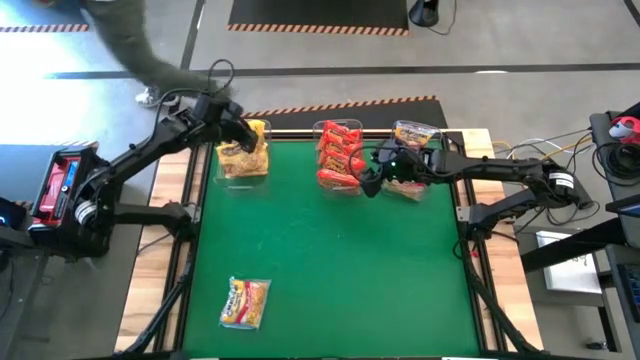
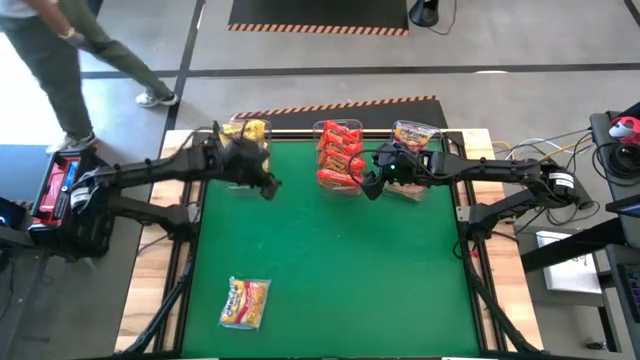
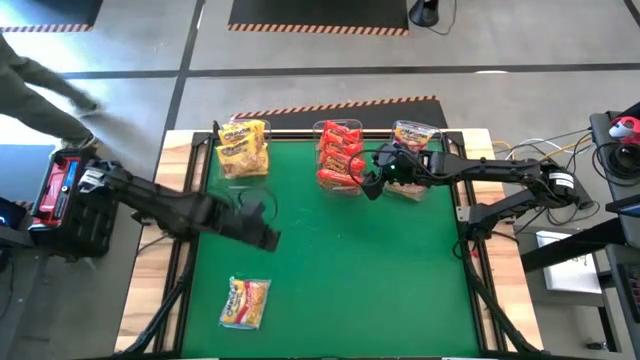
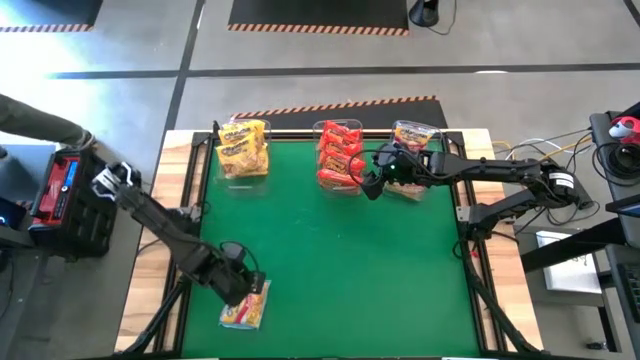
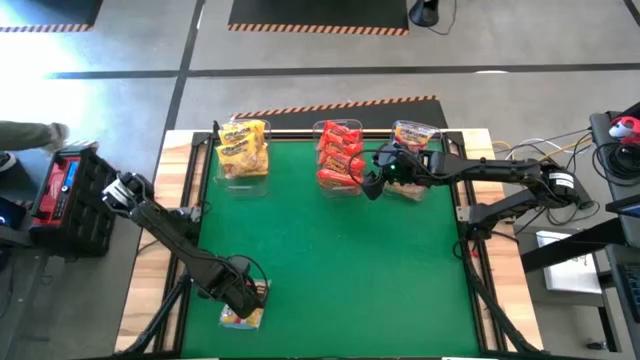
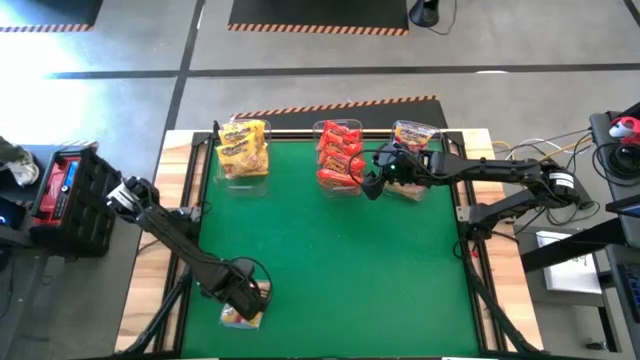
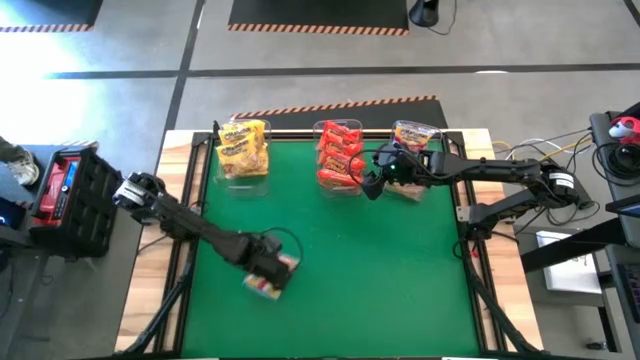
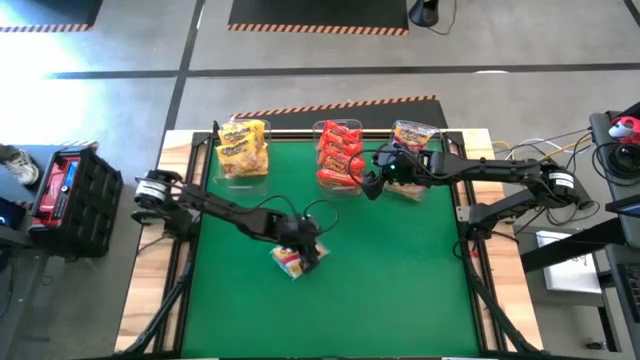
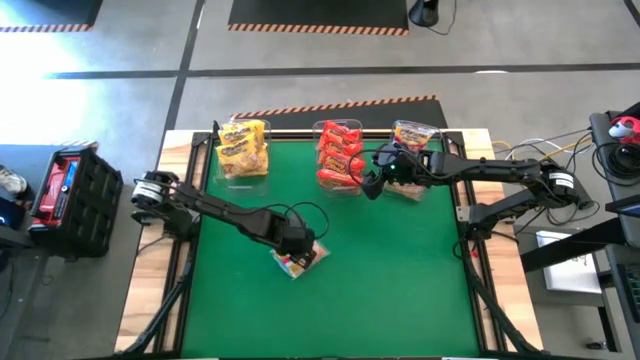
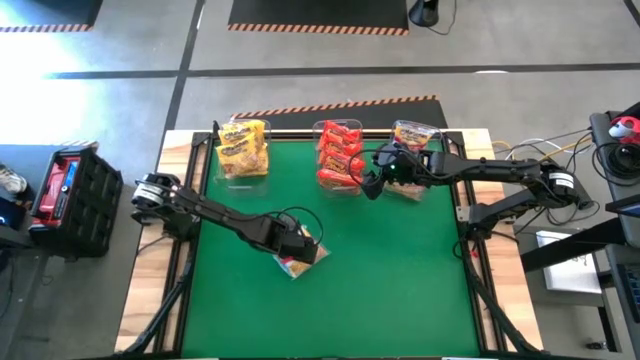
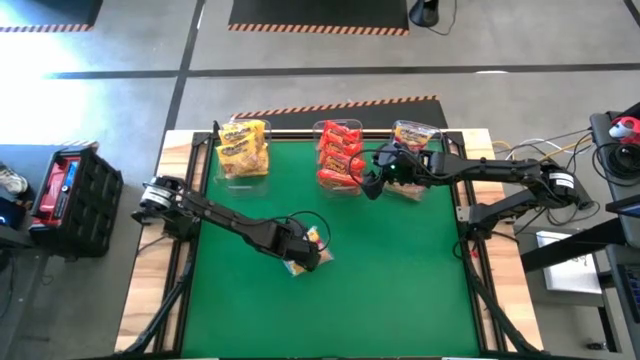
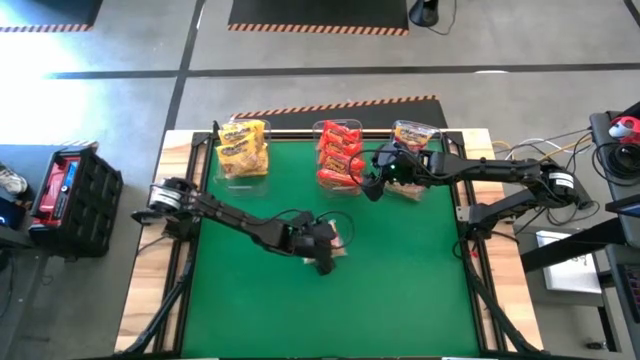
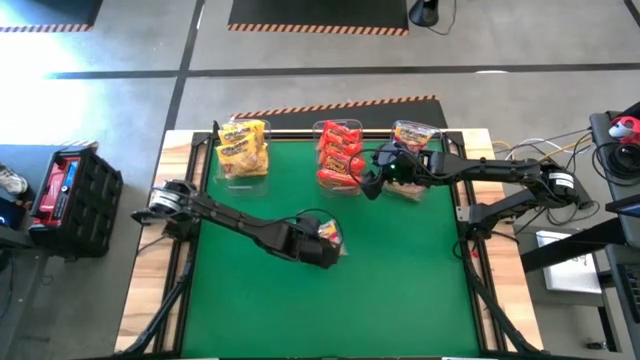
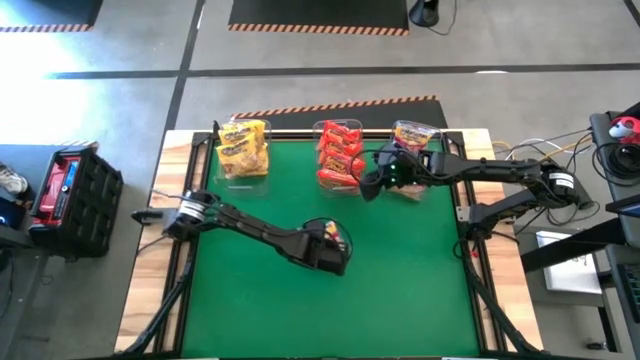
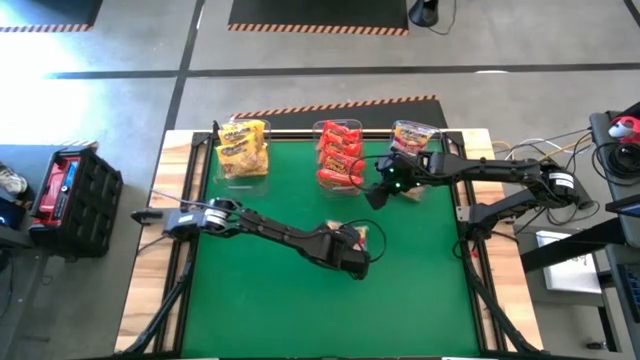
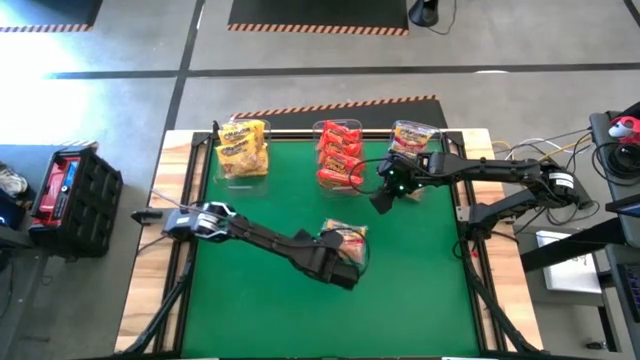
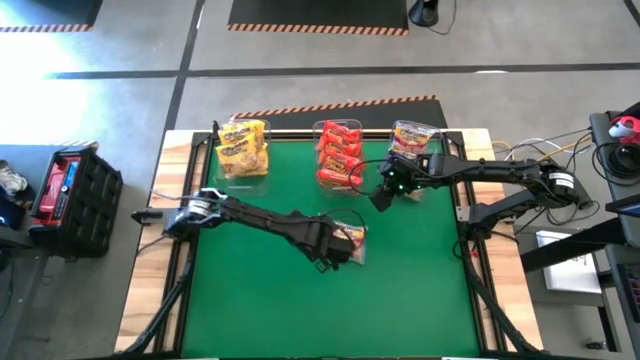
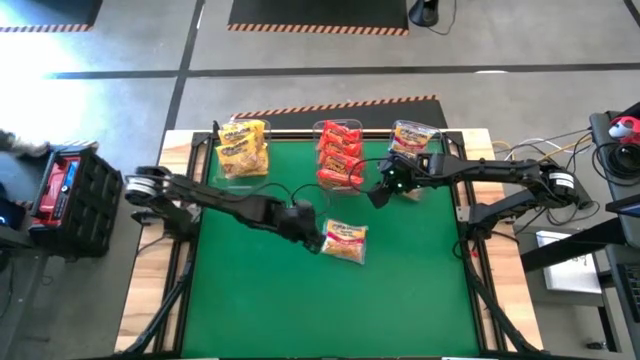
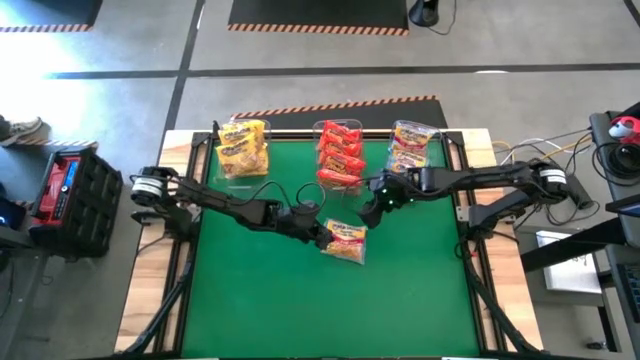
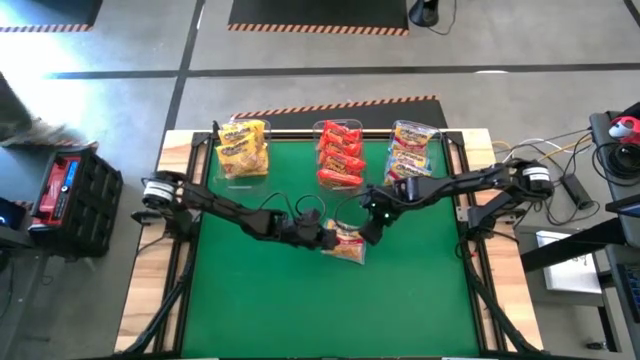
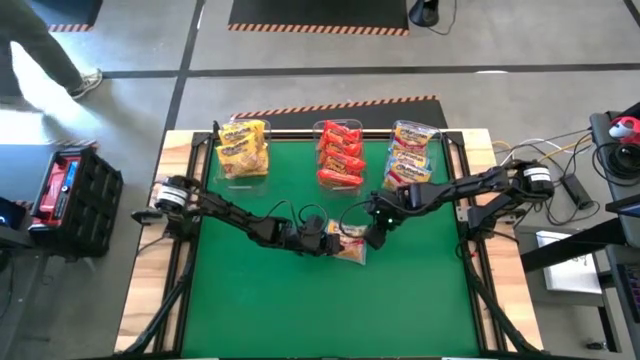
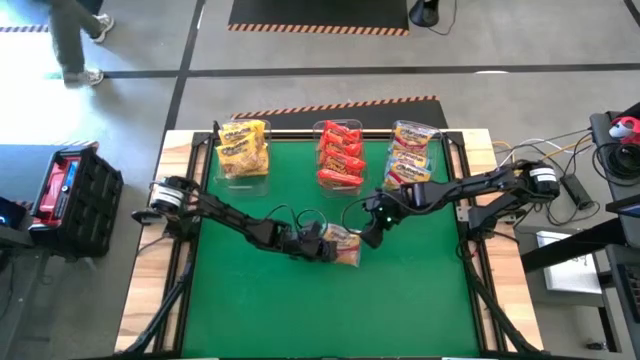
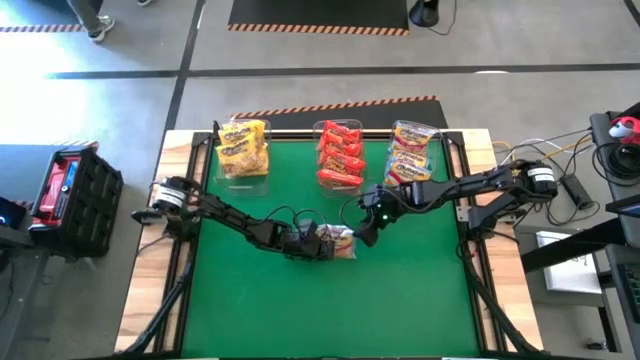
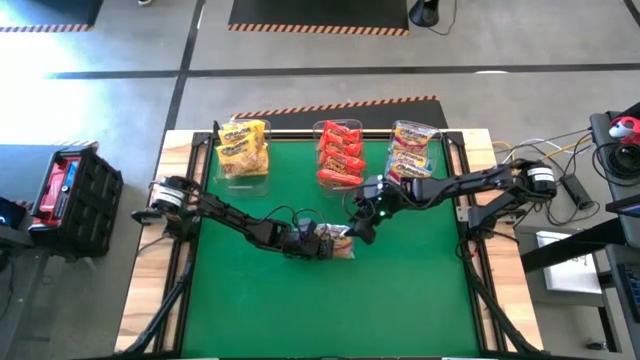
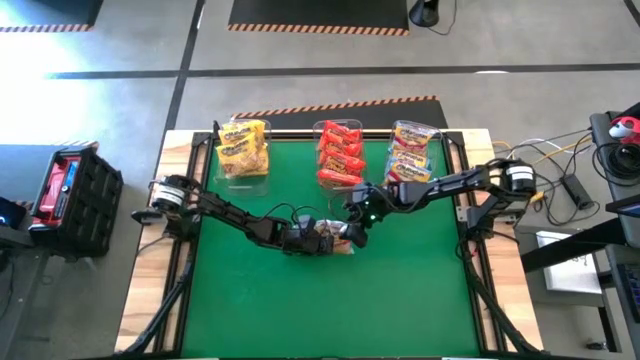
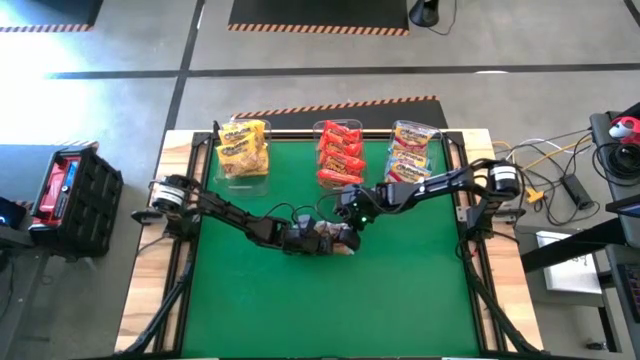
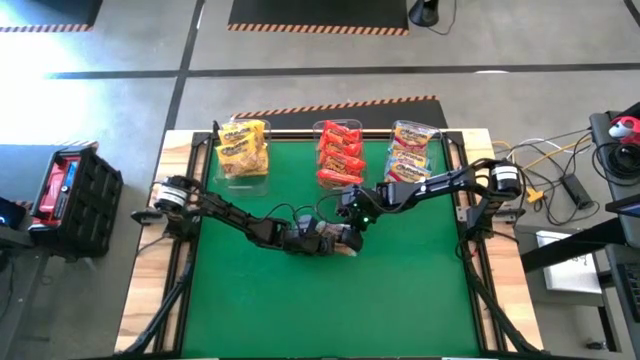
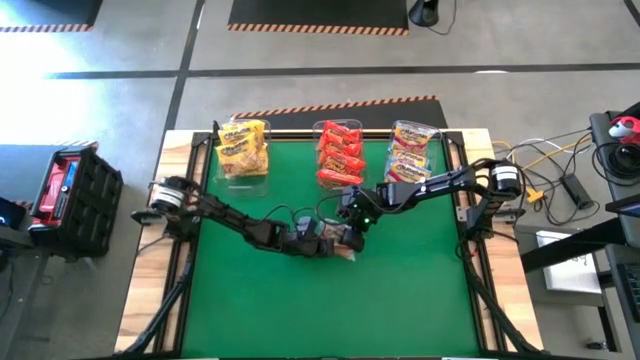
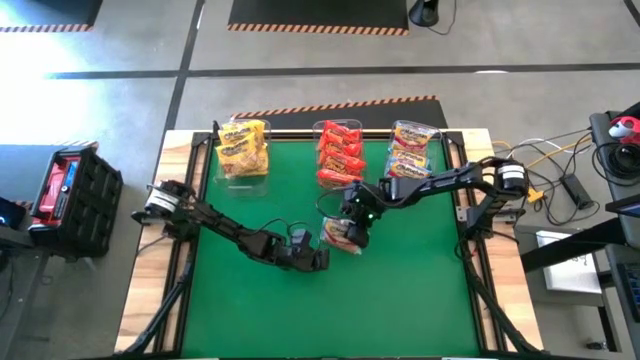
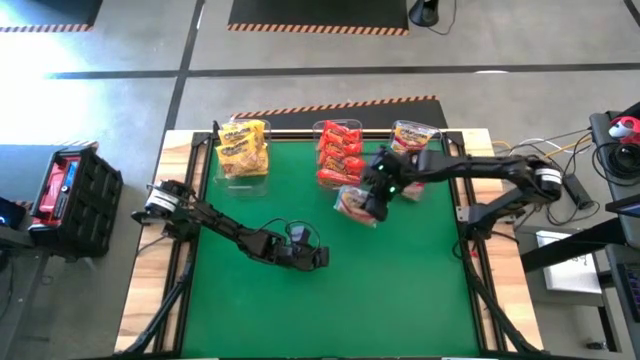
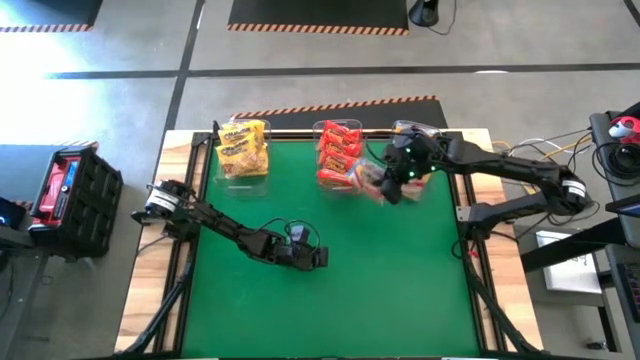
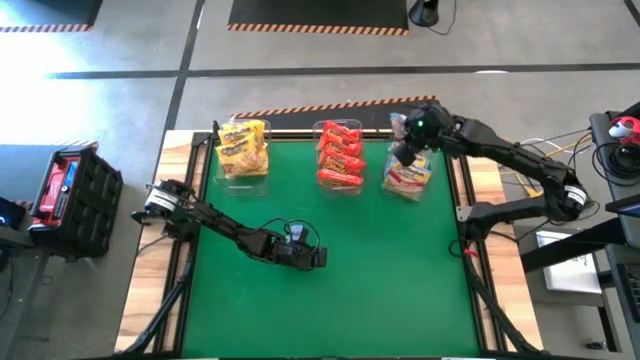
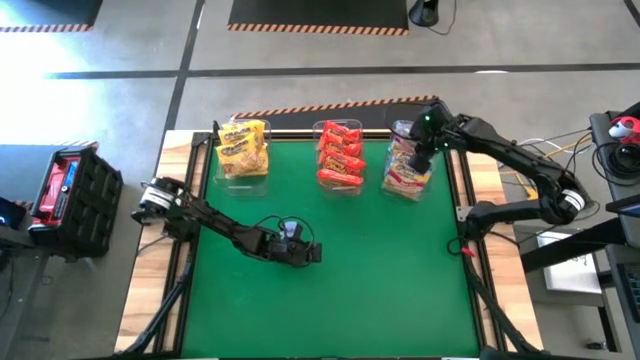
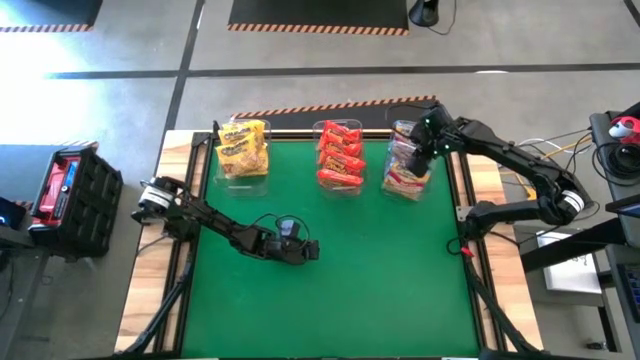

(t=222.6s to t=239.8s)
Task: Sort Maruchan noodles
Put the blue noodle pack into the right transparent bin

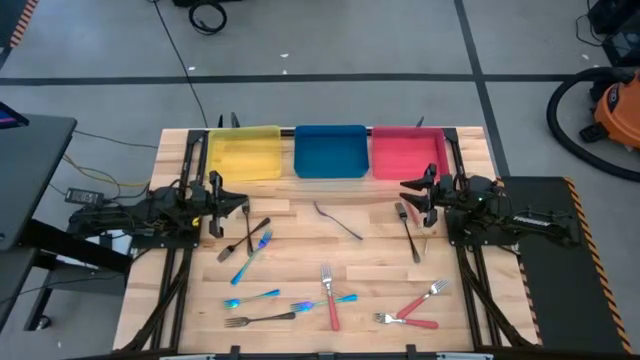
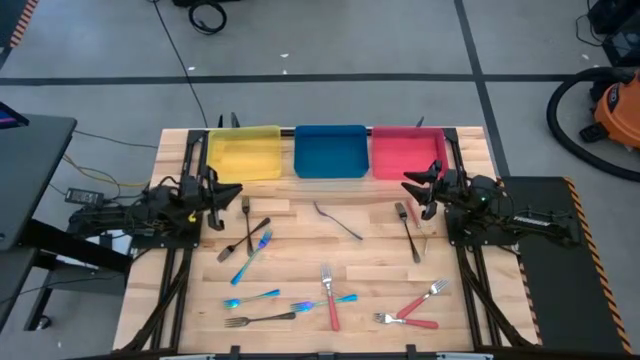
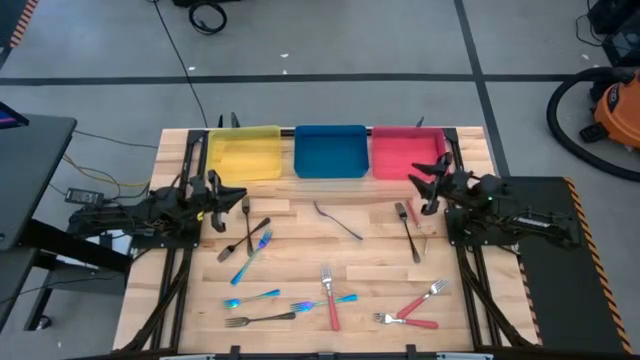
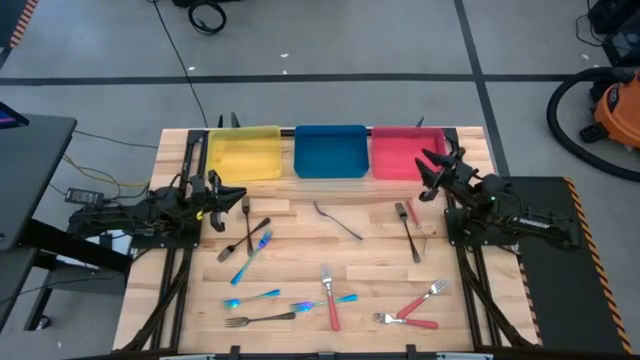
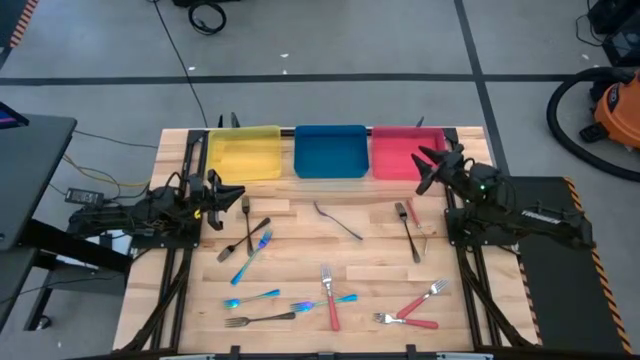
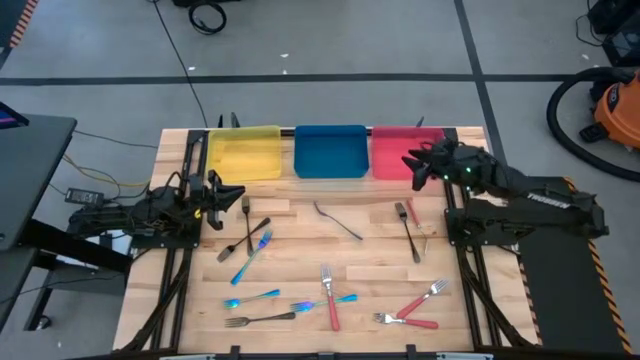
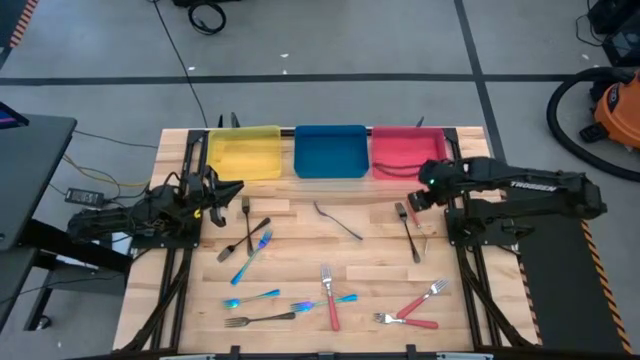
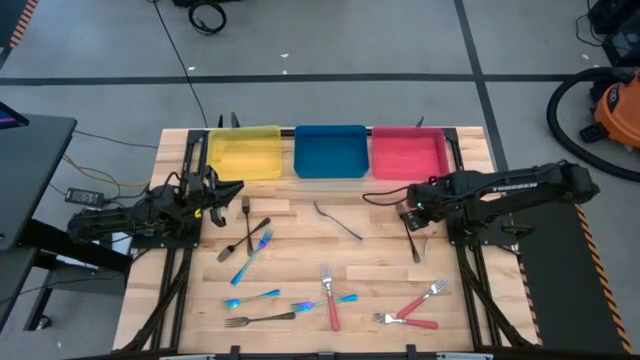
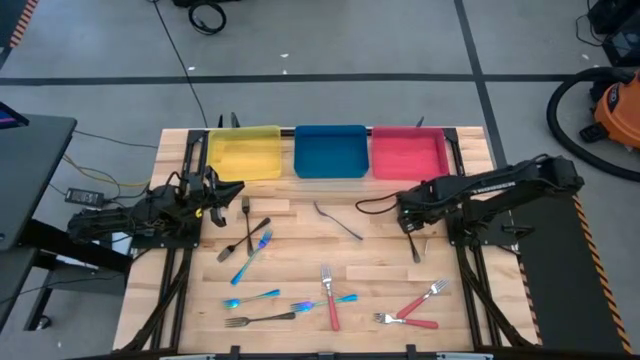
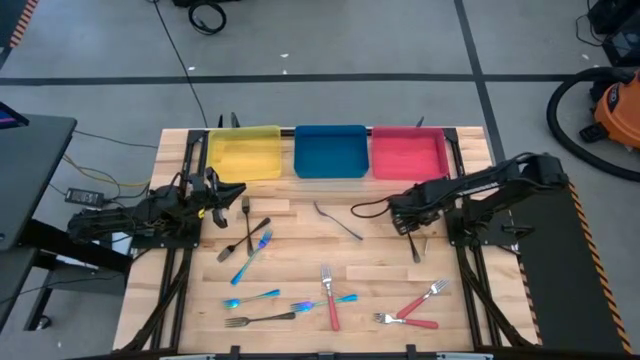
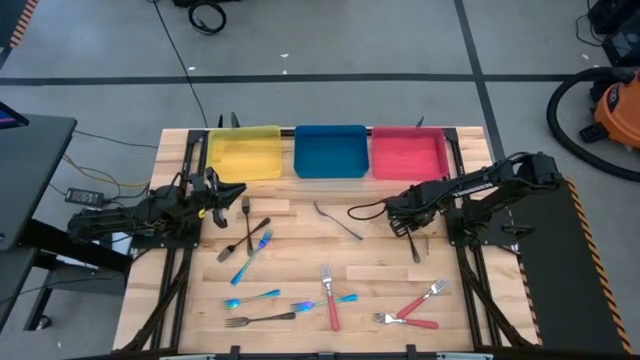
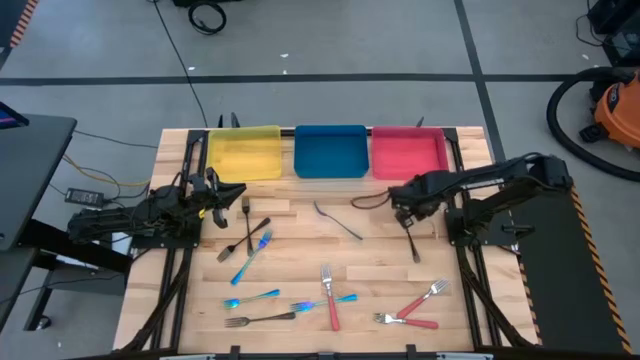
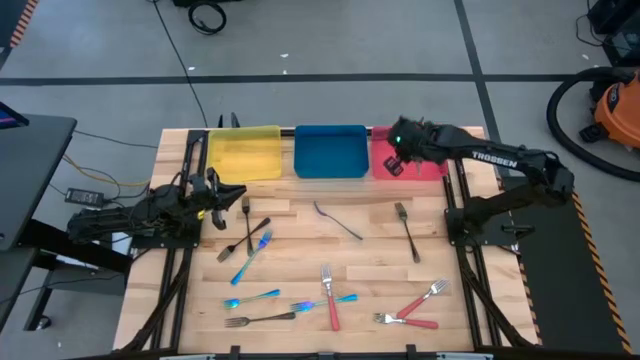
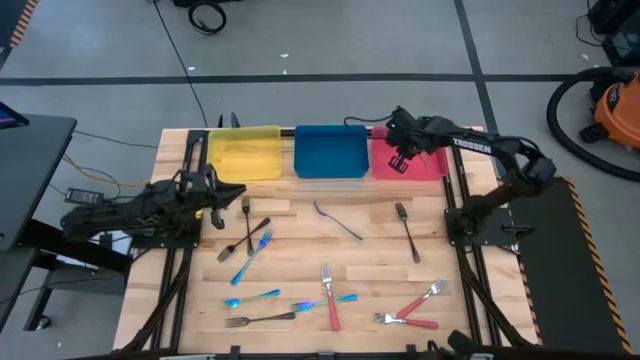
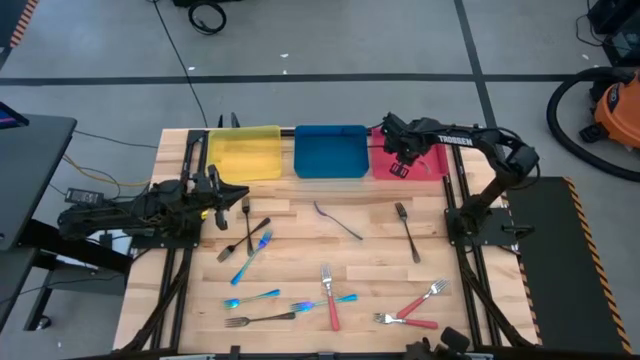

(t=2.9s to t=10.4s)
Task: Sort silverware by color (type)
Put the pink fork into the pink bin
